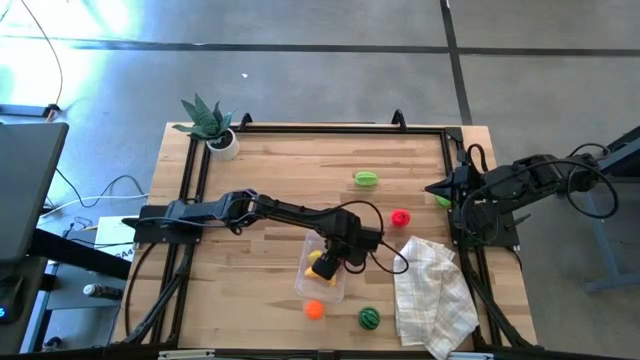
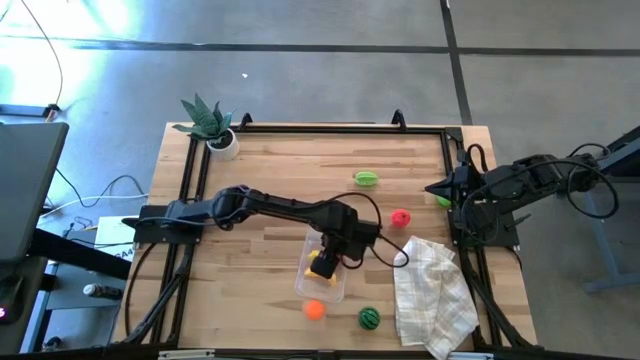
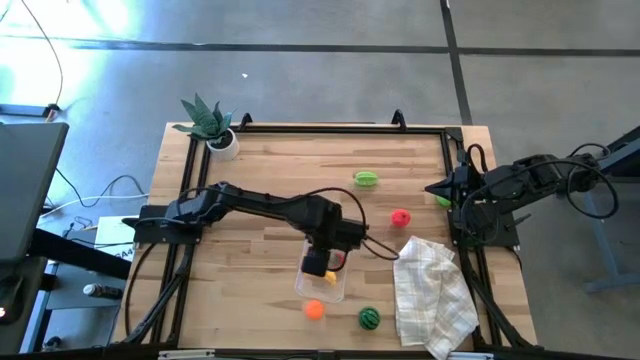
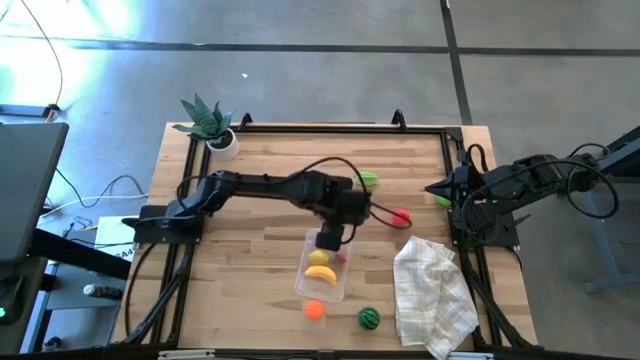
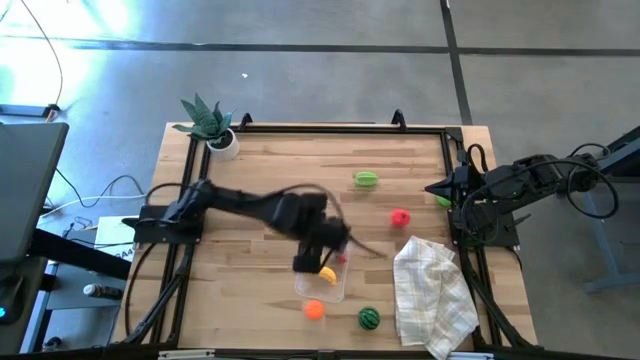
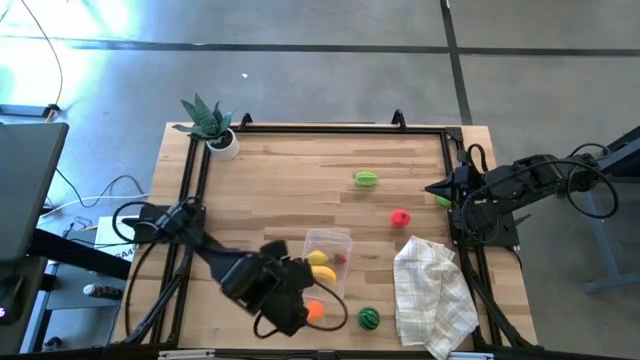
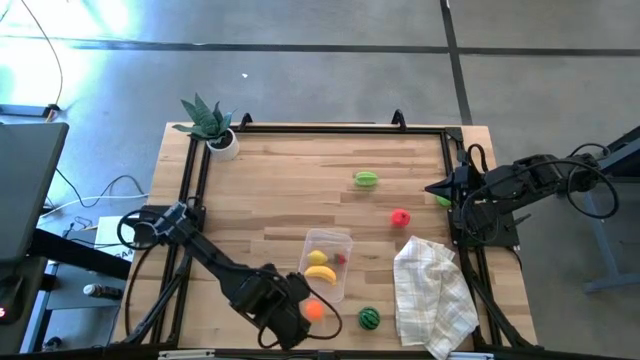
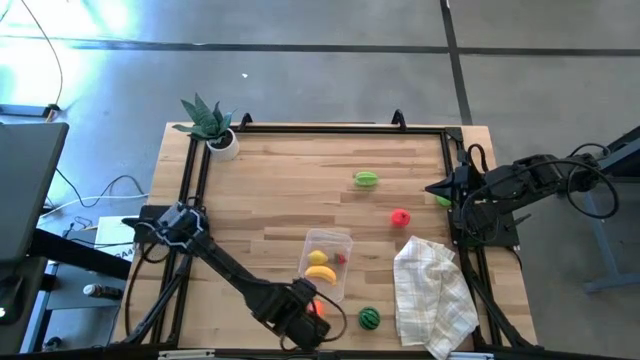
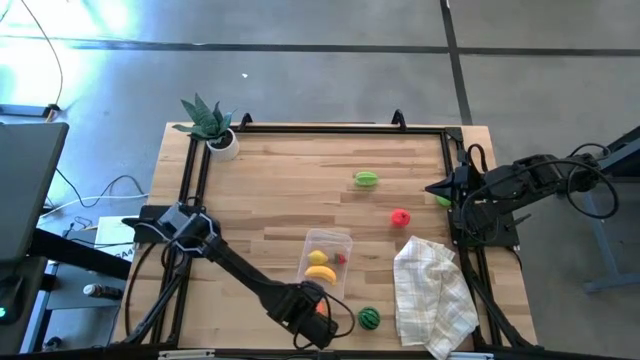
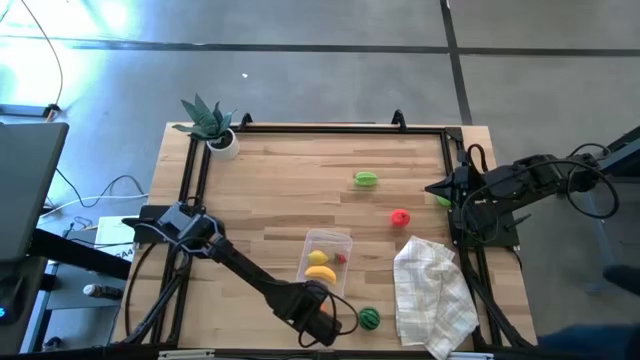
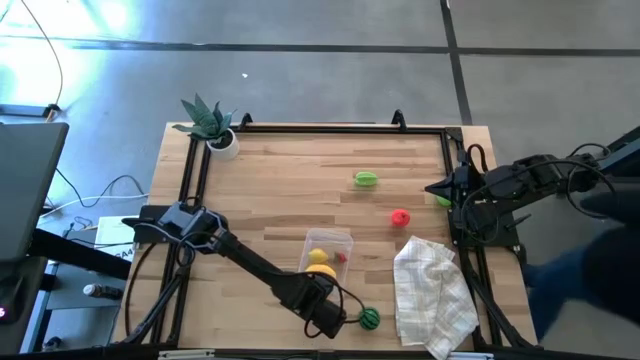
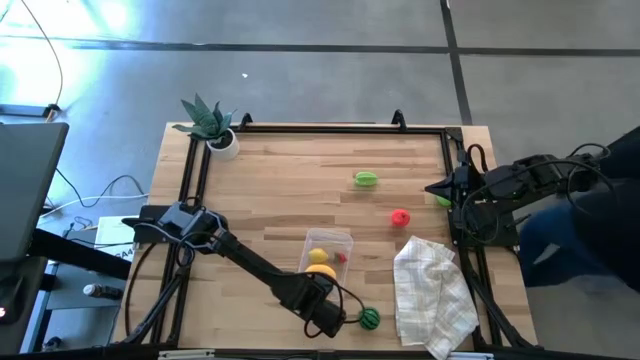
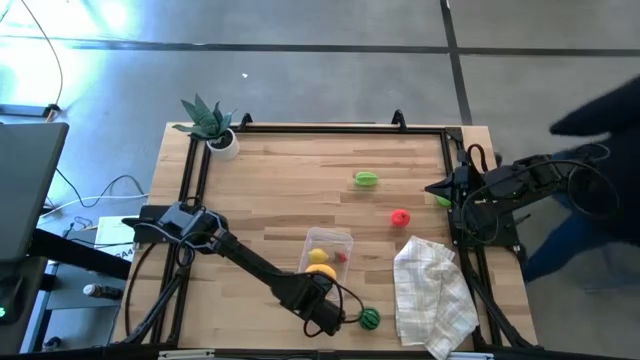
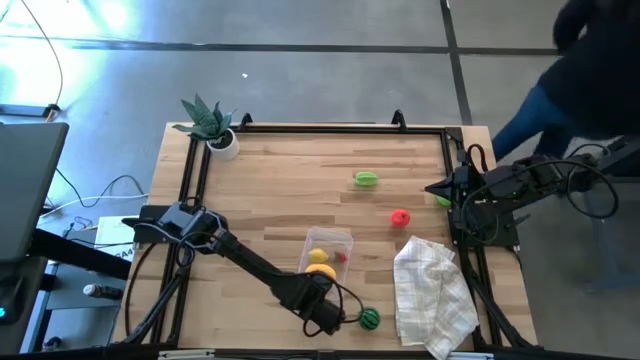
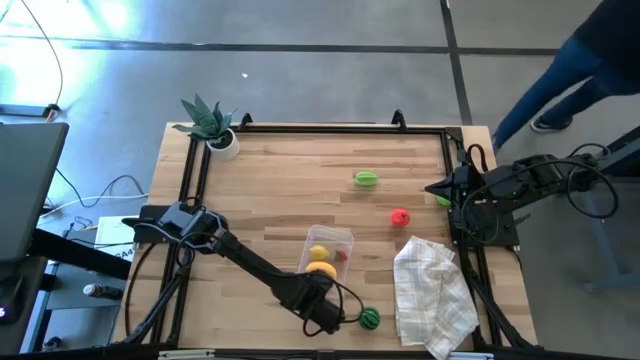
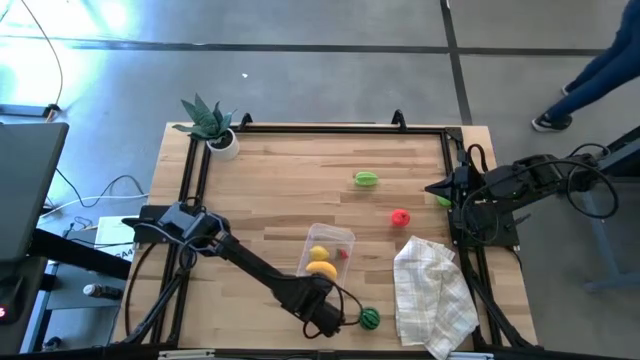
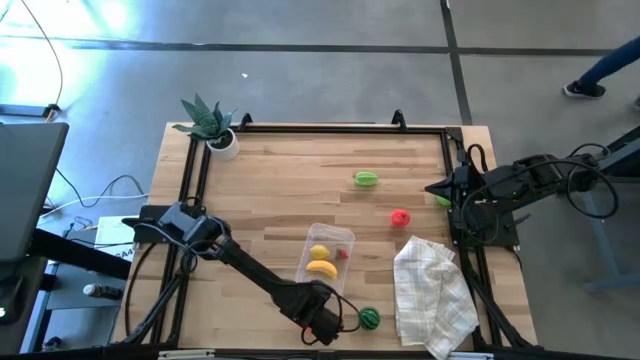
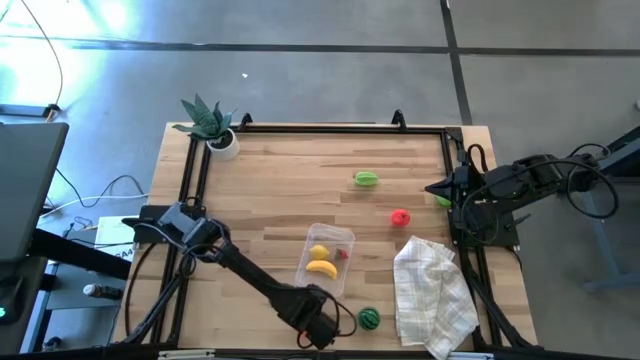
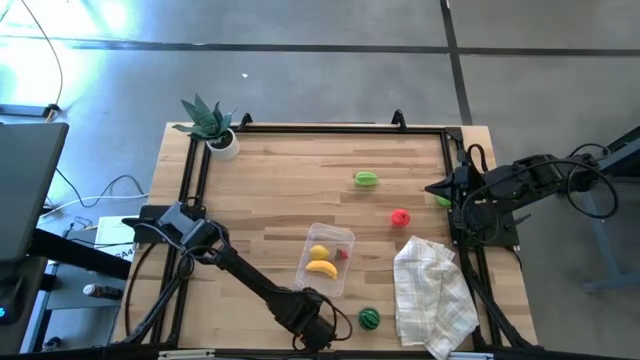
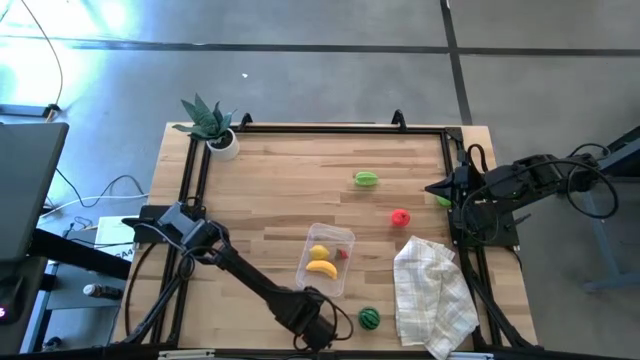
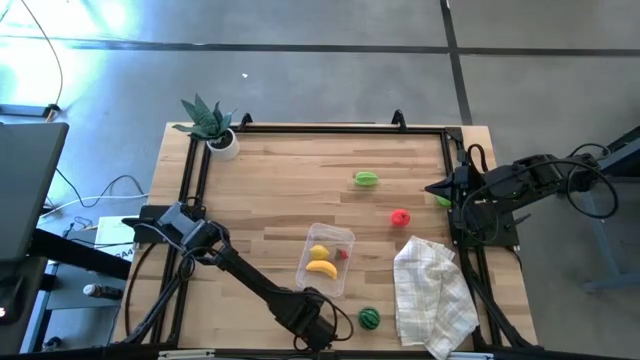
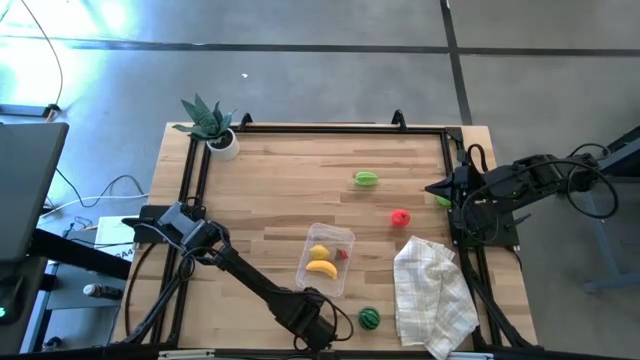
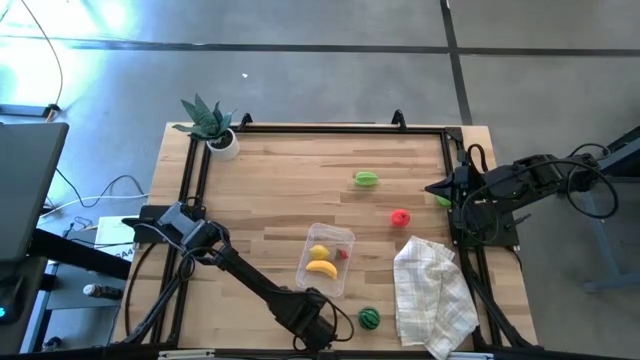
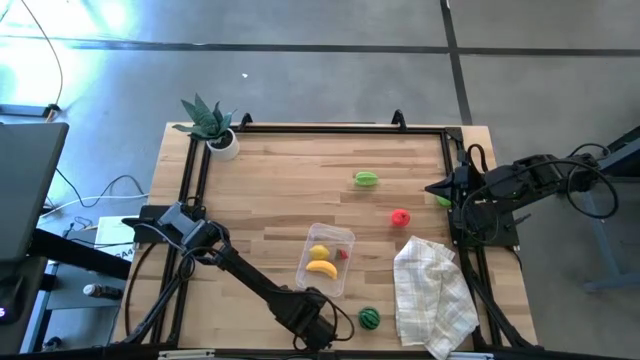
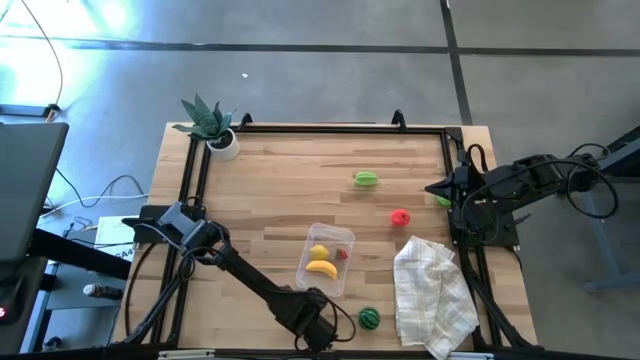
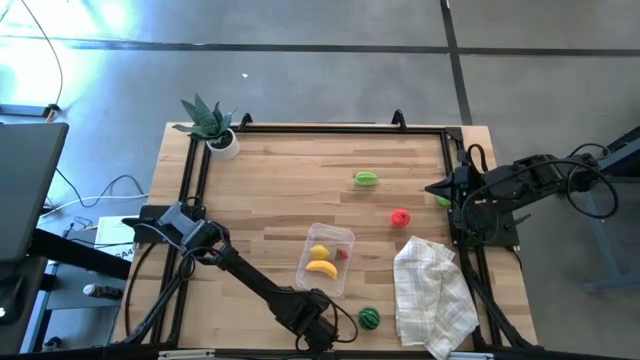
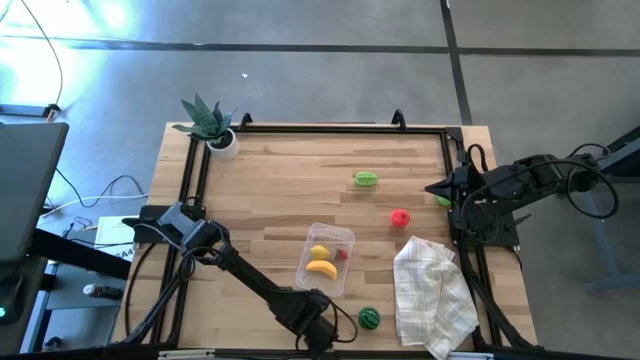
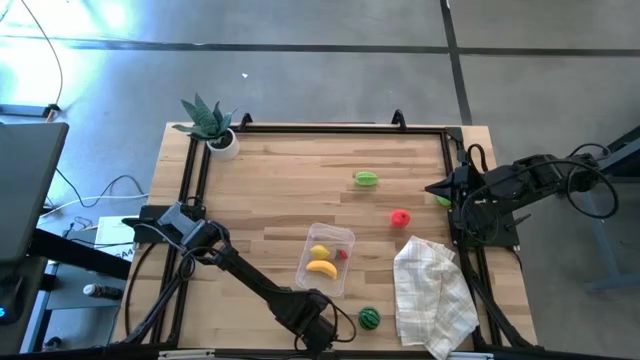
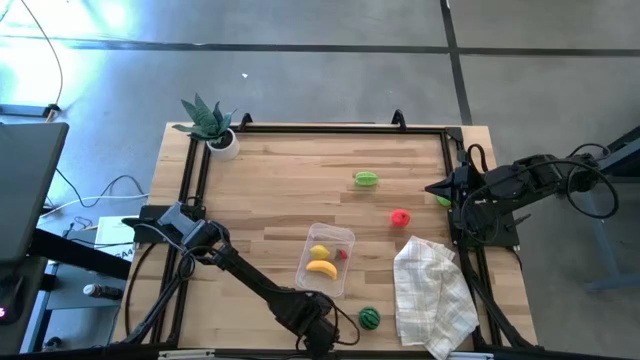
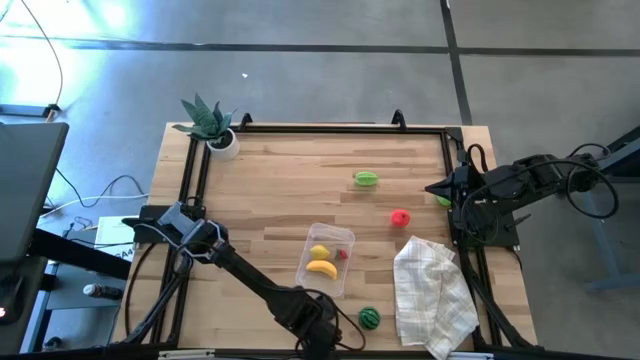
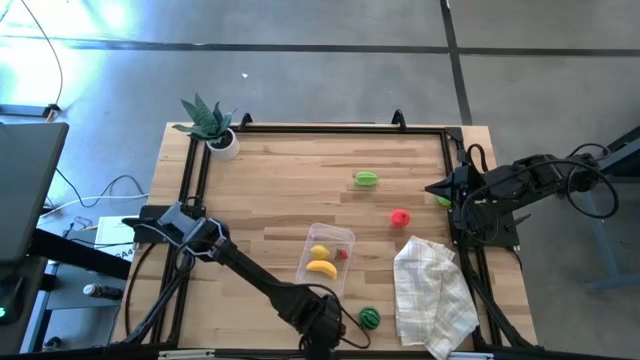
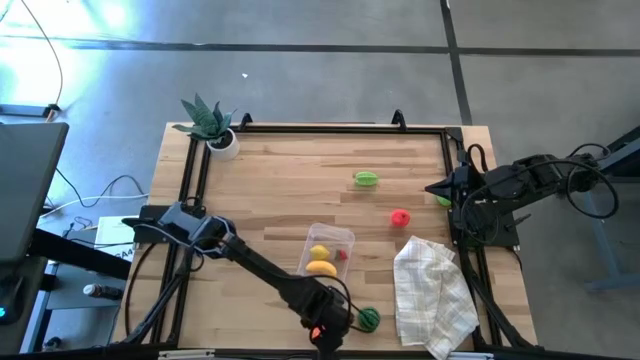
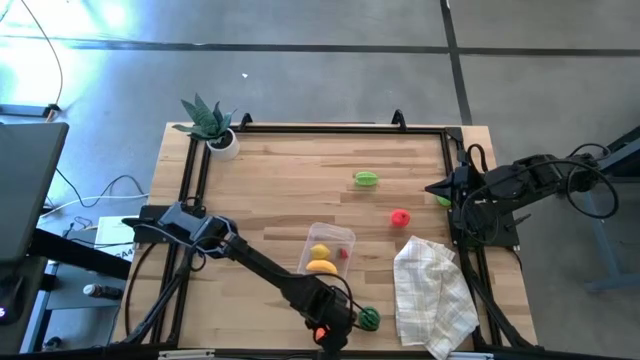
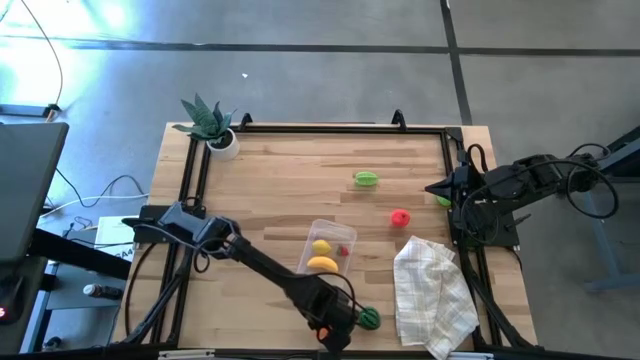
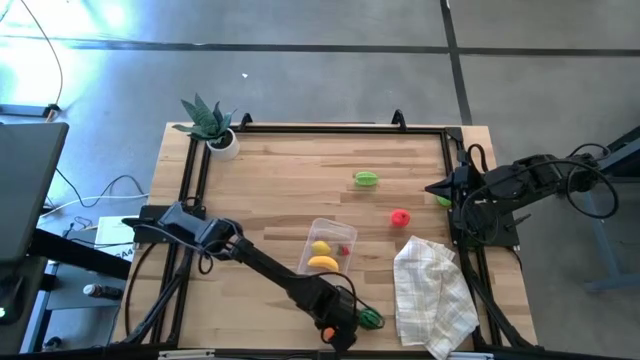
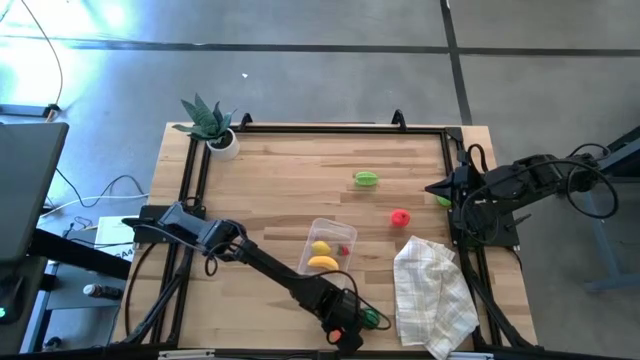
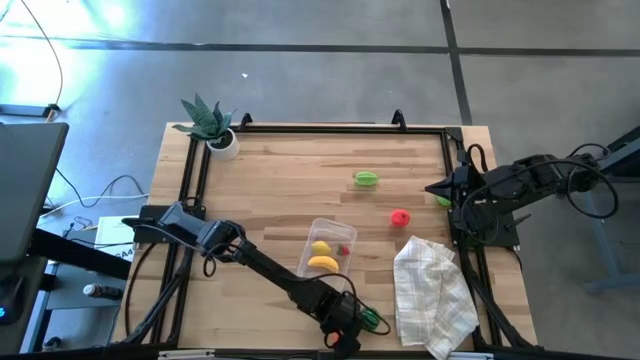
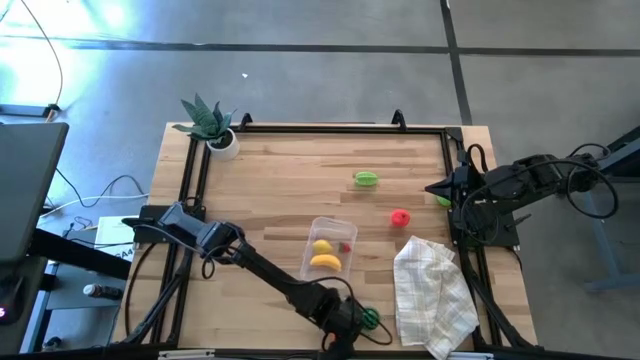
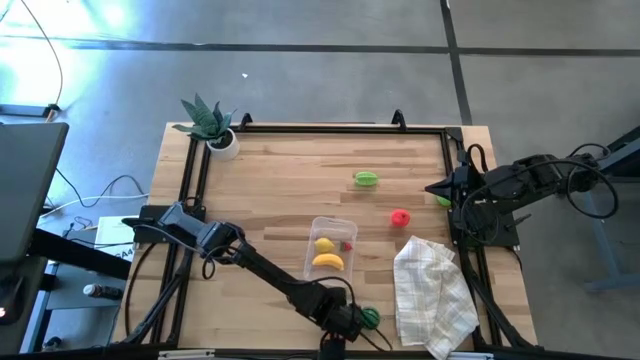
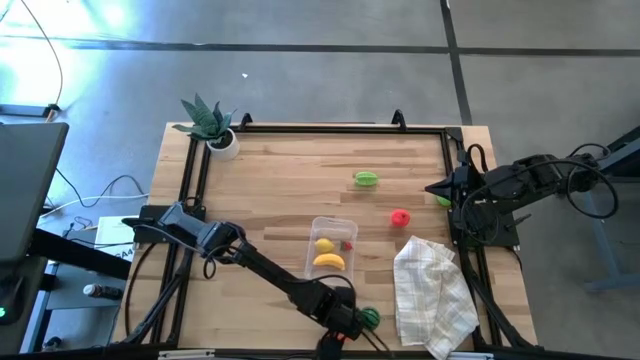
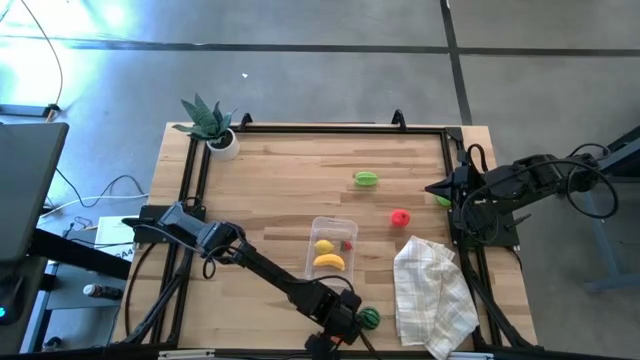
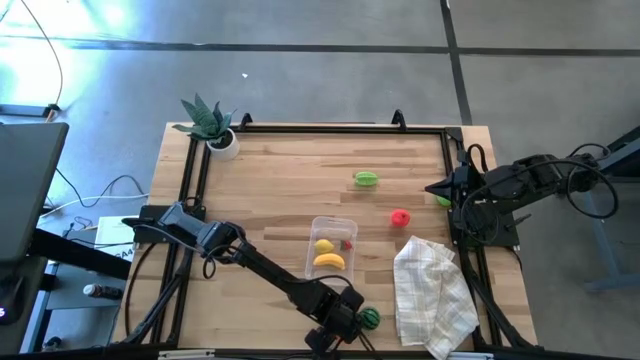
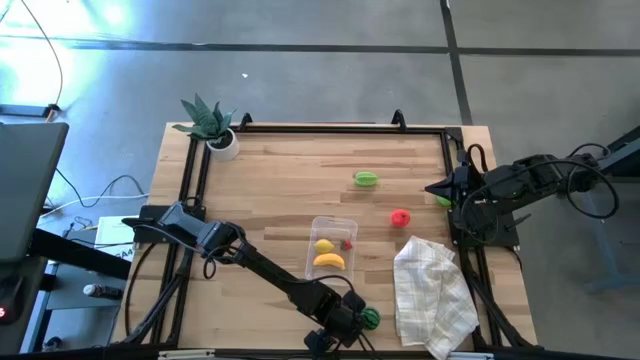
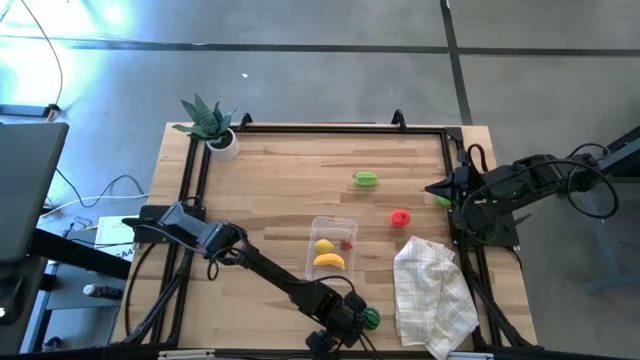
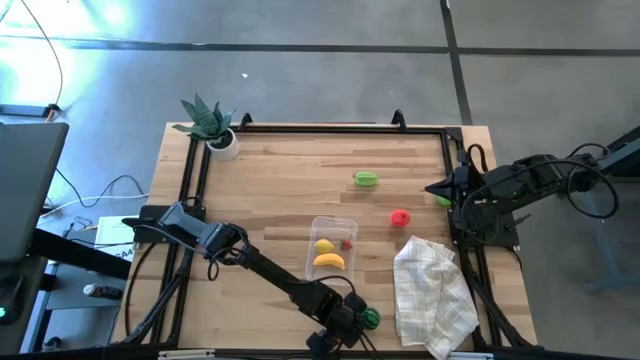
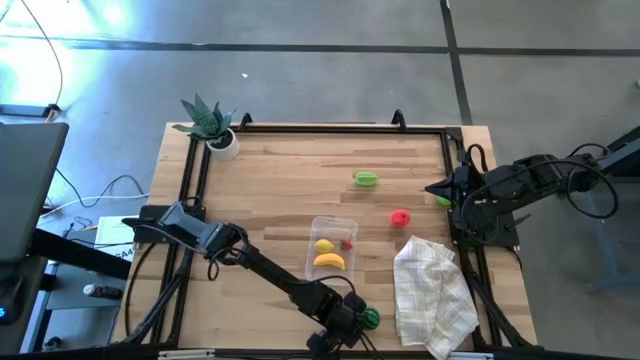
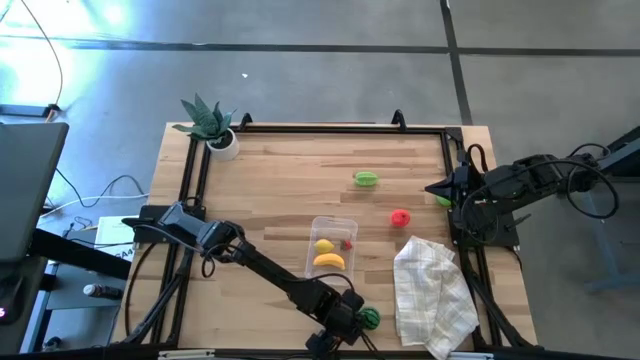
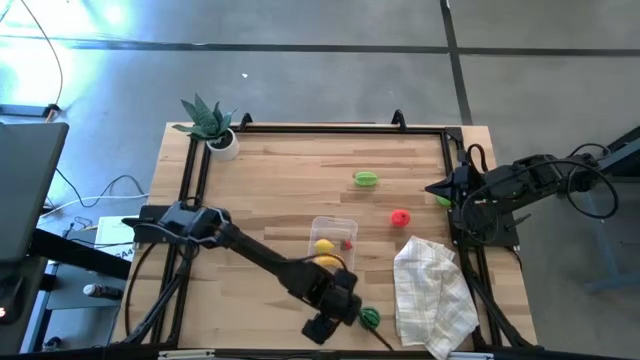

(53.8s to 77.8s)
Task: Pick and placing Produce into tupperware
Put the pumpkin into the transparent bin
